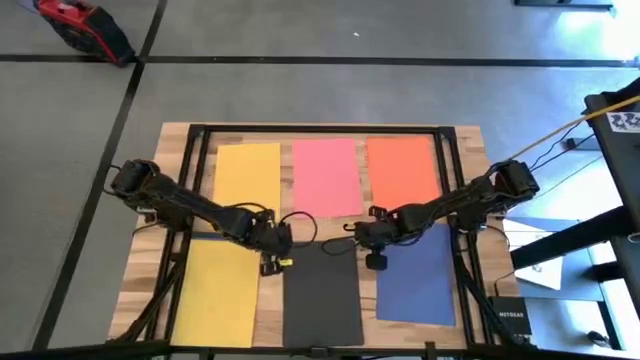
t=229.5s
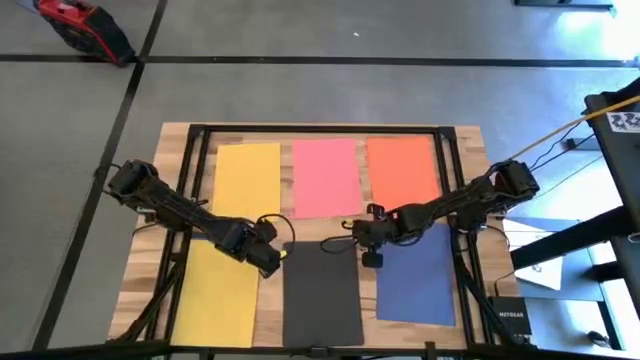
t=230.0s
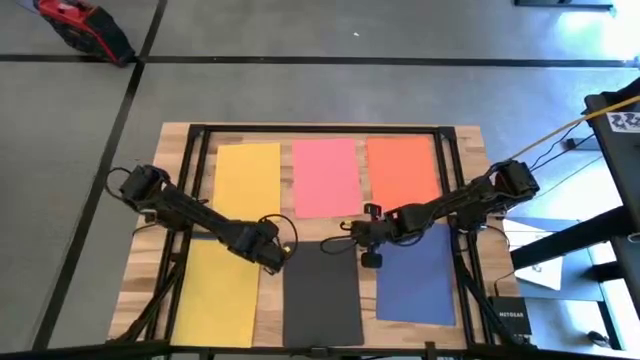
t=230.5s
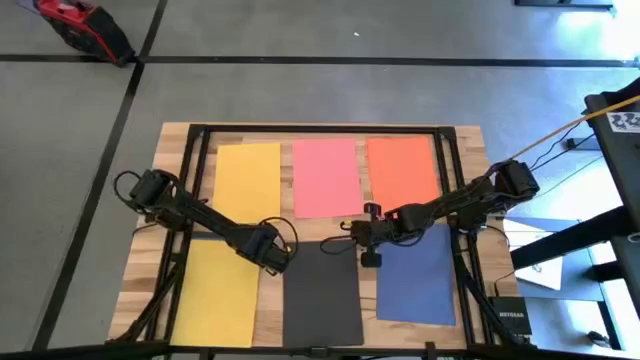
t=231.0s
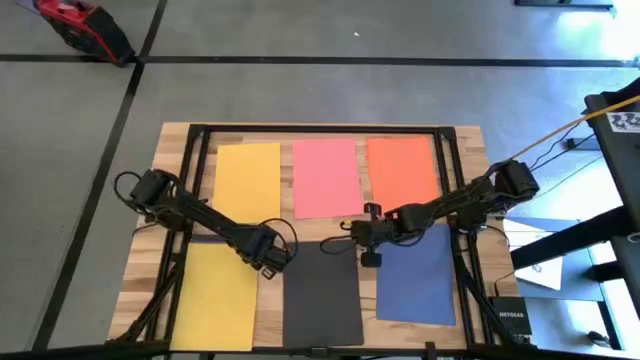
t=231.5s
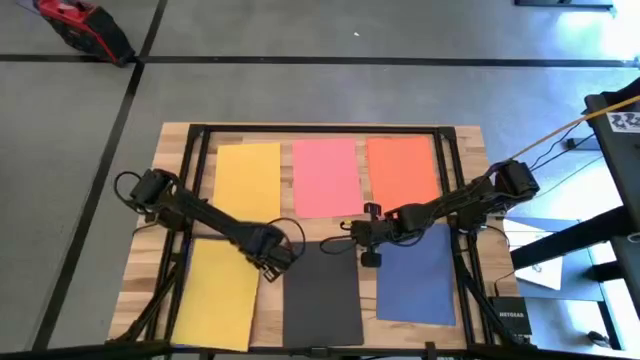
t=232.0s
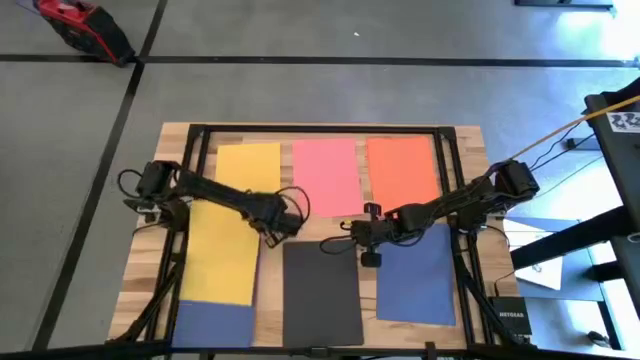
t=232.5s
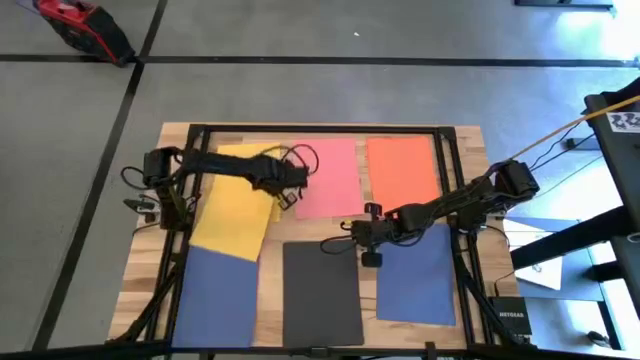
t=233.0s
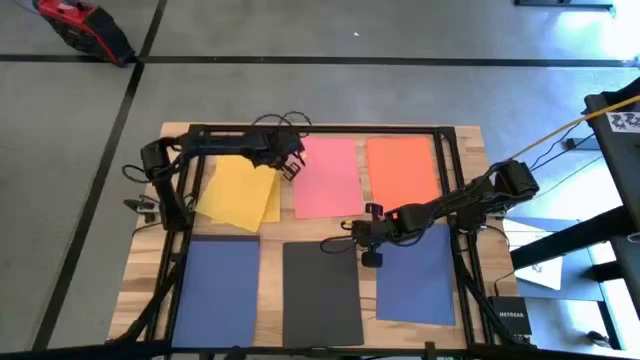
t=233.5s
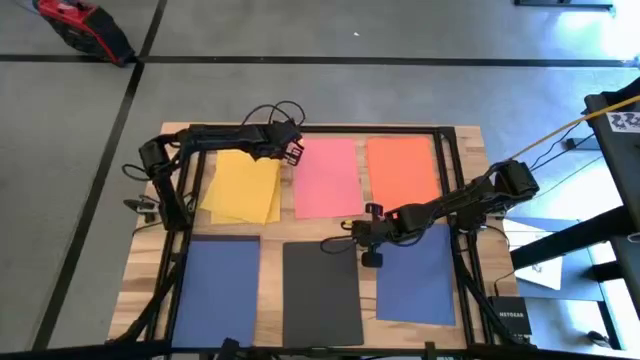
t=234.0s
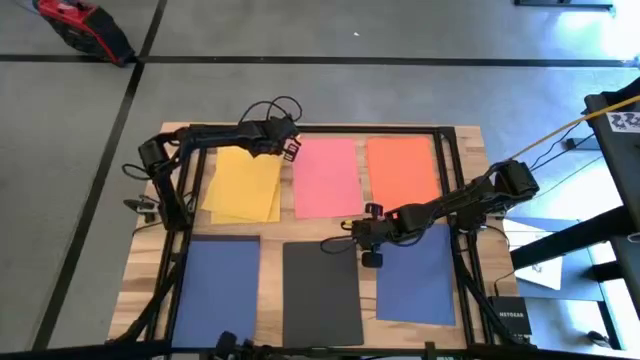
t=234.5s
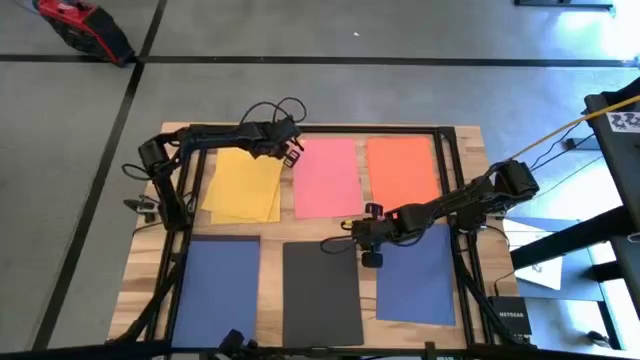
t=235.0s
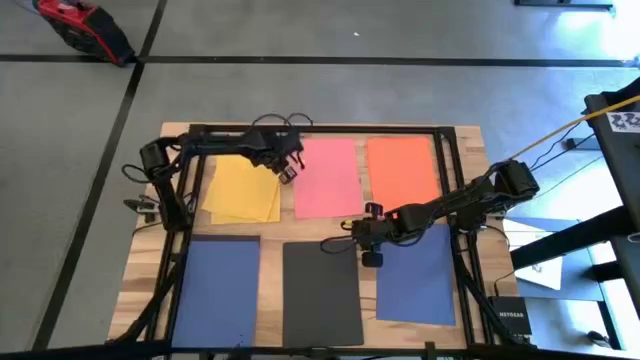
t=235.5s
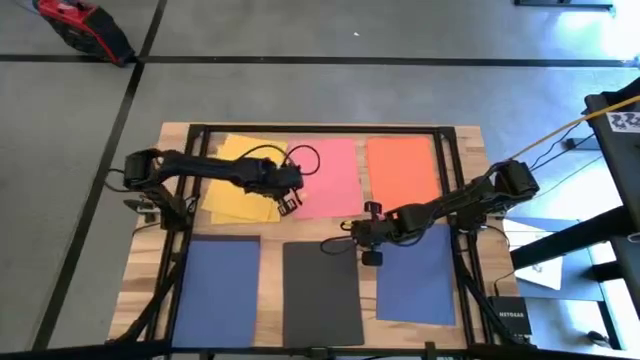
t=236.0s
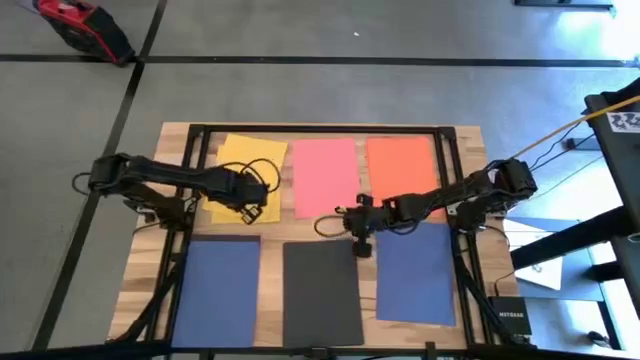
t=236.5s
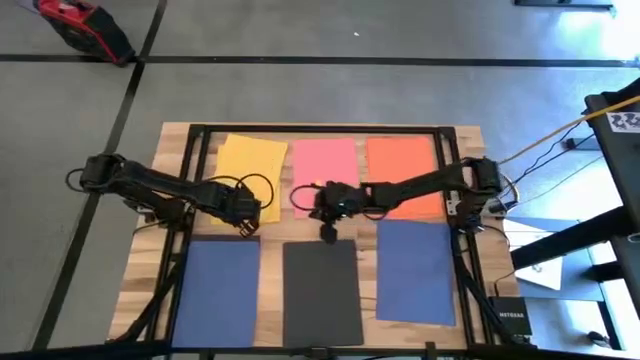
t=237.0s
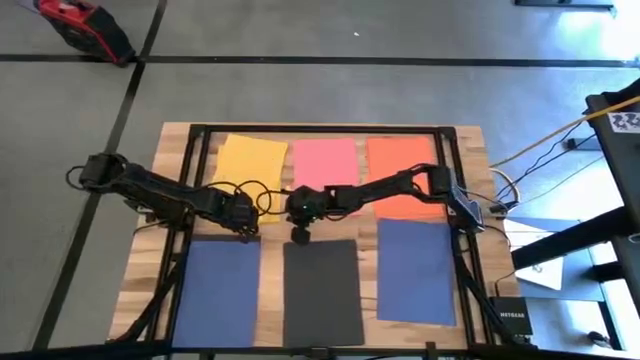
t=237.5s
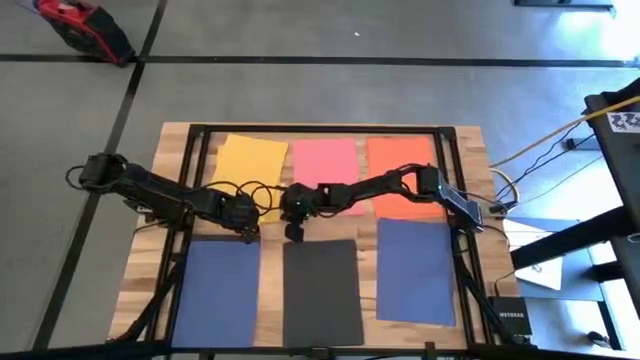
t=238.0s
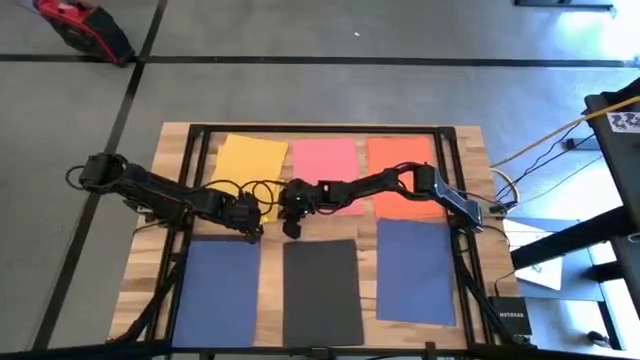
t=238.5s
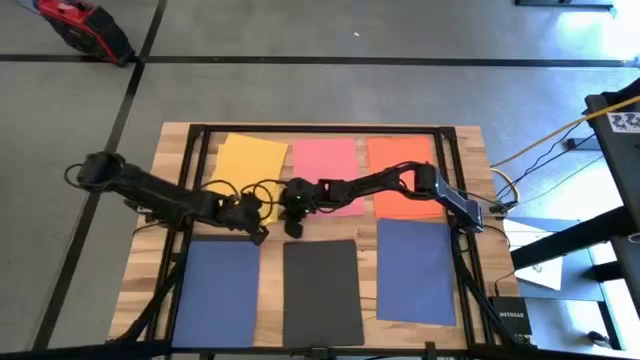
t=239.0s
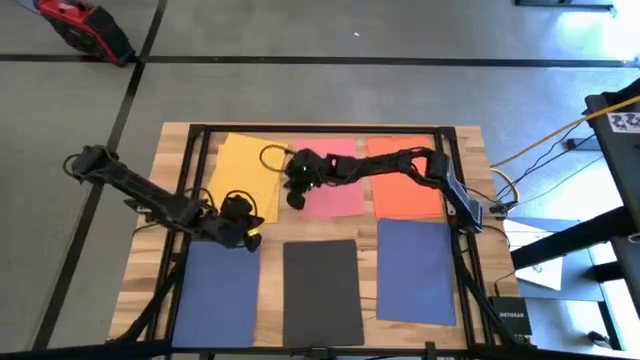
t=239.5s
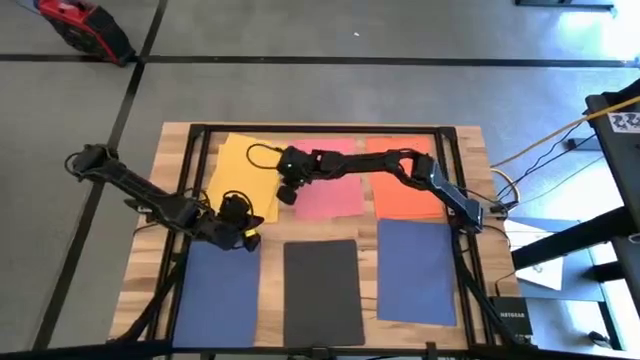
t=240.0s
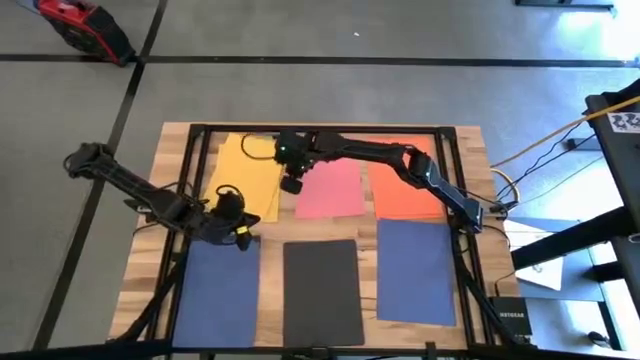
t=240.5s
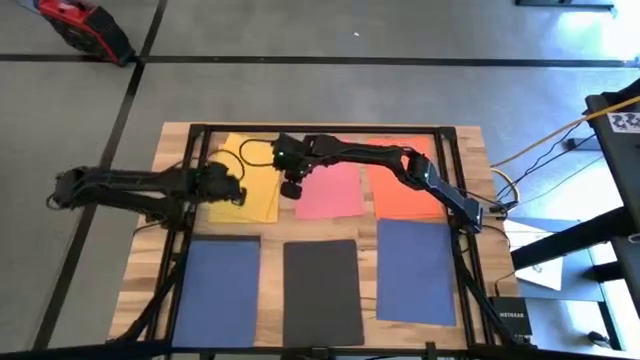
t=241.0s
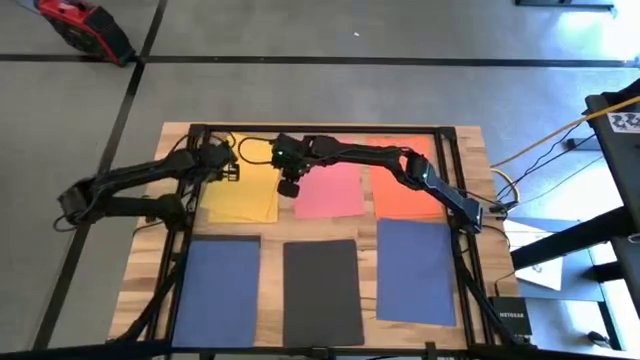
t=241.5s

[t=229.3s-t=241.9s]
Task: Organize paper
Stack the yellow paper on the top of the yellow paper

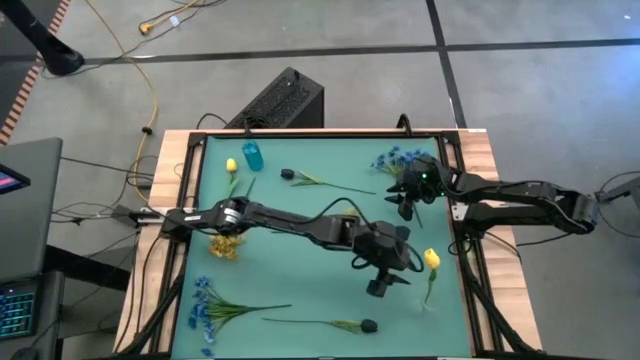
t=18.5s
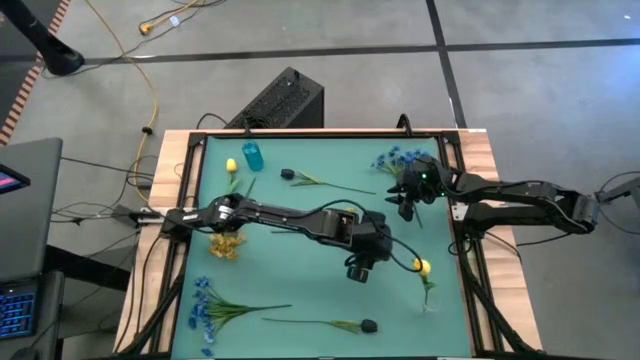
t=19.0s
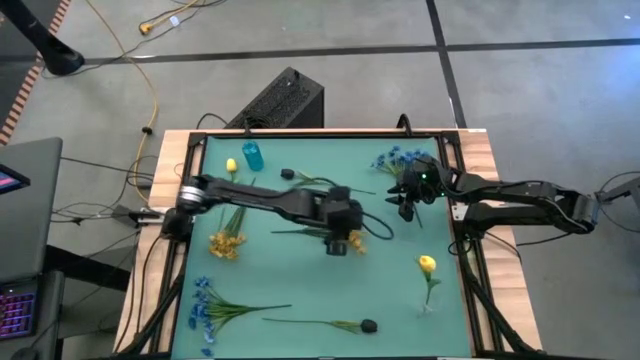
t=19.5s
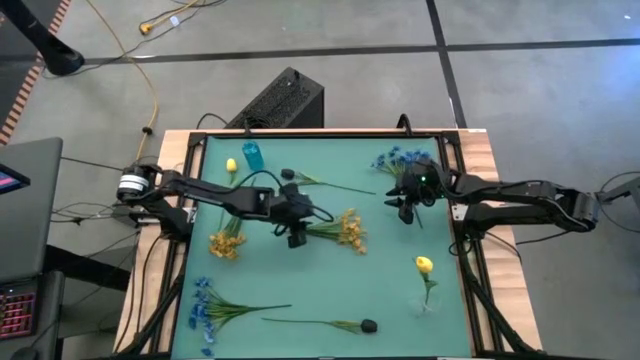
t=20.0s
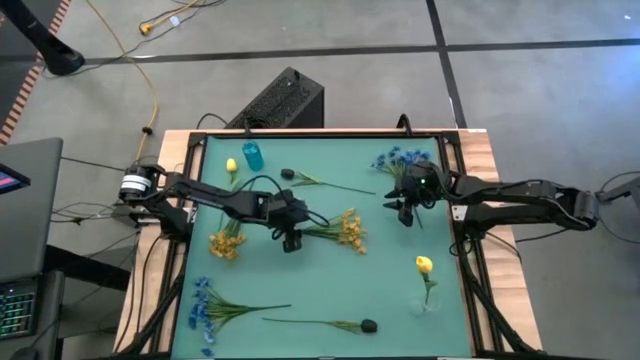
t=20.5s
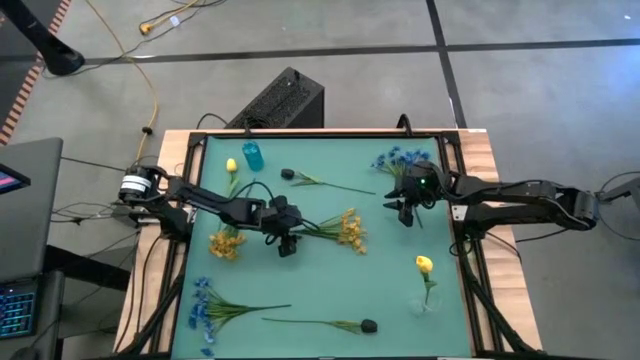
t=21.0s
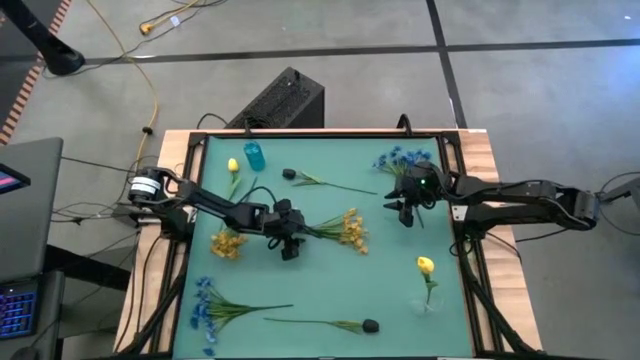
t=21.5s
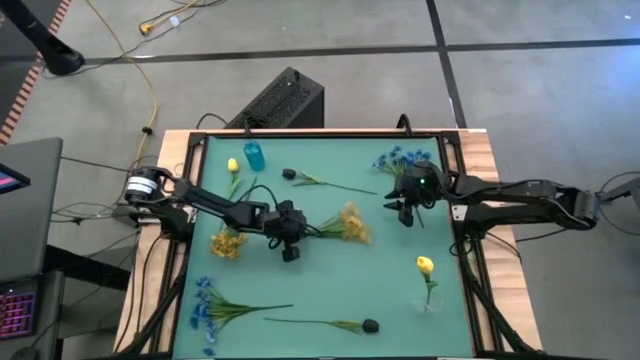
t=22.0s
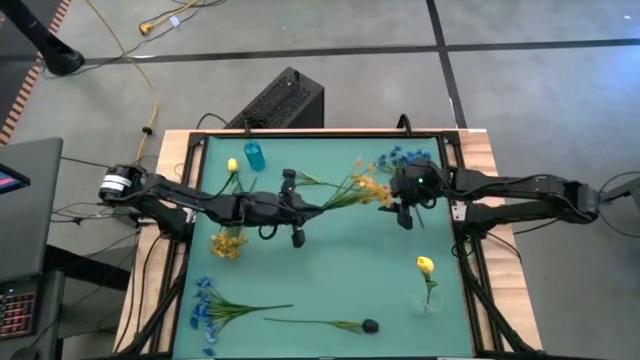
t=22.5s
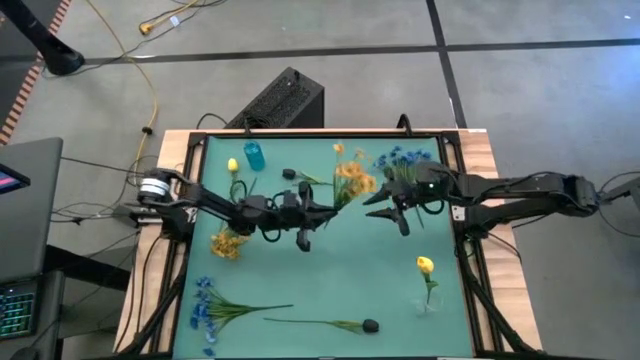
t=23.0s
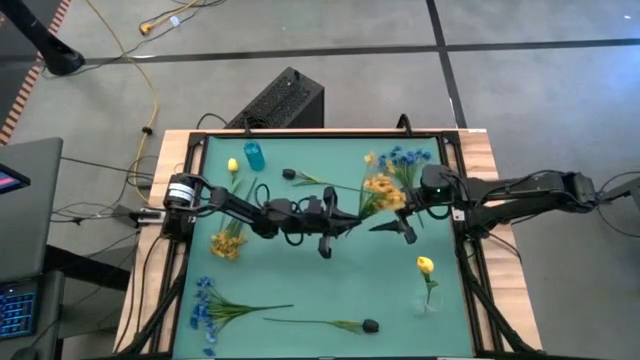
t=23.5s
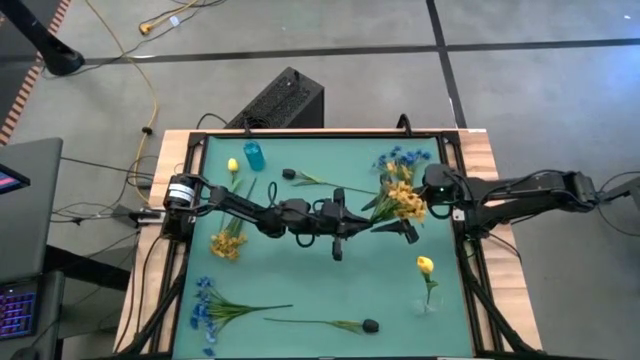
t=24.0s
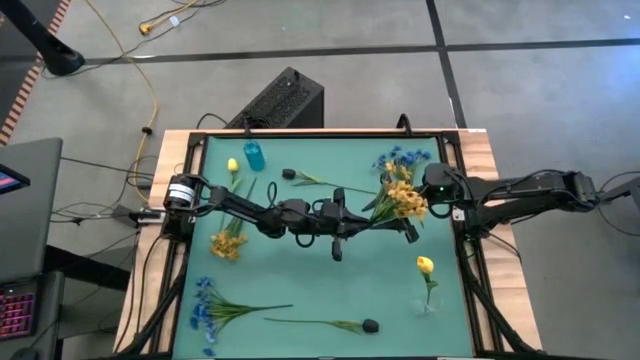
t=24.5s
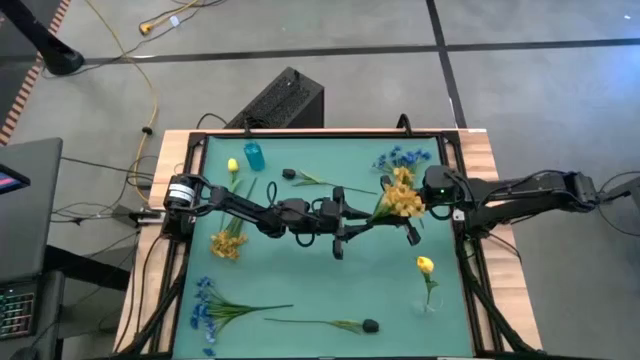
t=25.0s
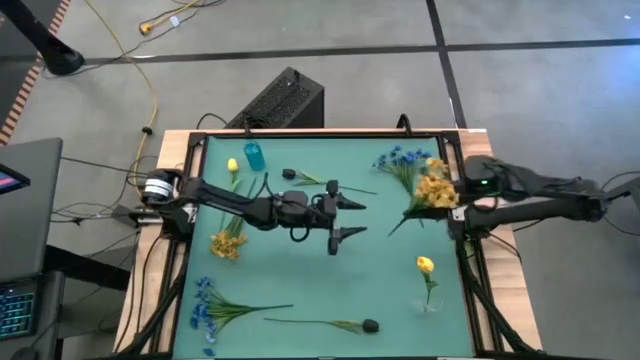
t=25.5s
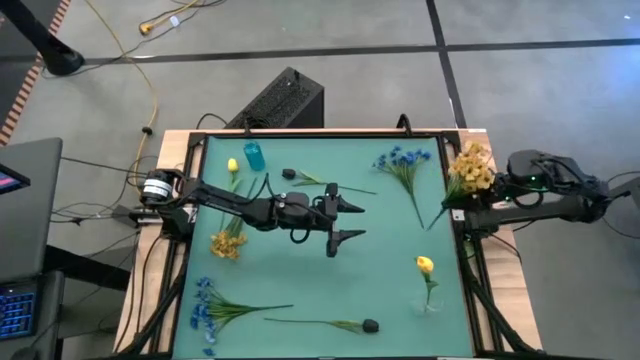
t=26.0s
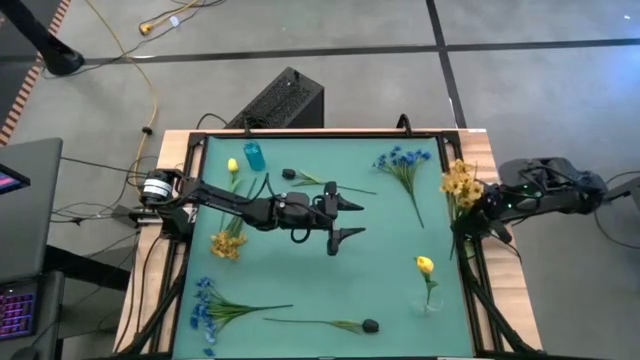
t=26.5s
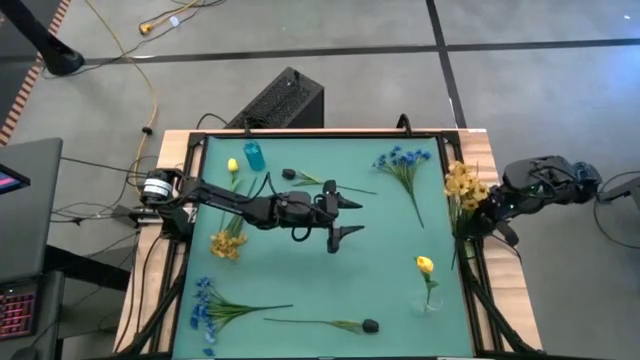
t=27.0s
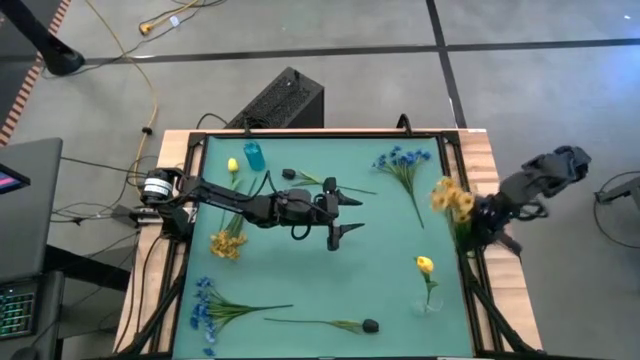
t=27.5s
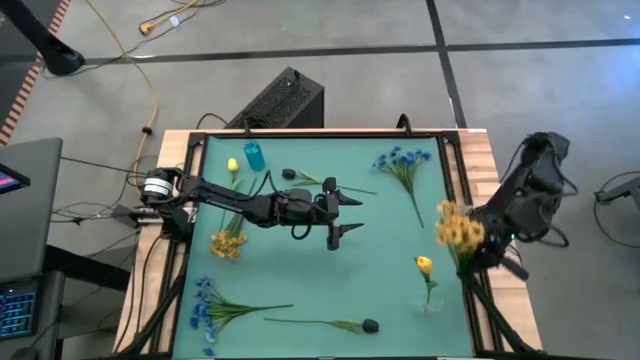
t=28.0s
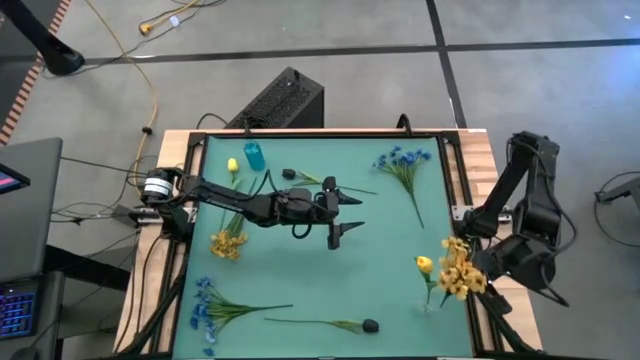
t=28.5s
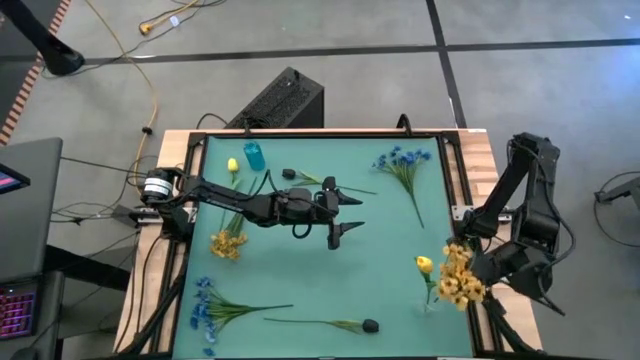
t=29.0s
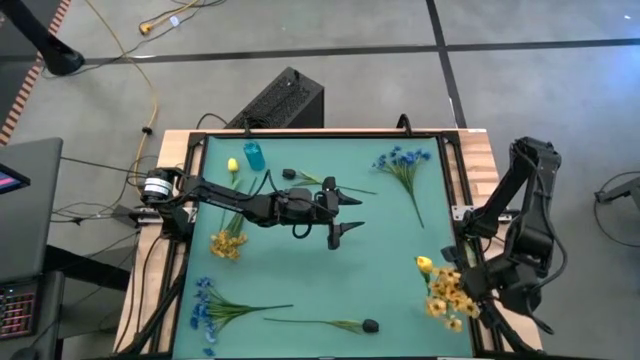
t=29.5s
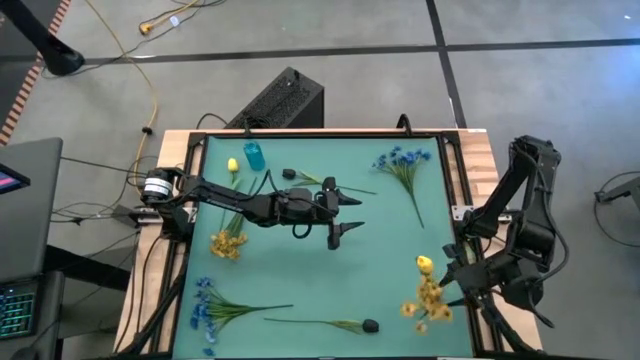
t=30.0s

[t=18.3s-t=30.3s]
Task: Sort flowers into vase by color
Put the right yellow flower into the transparent vase
